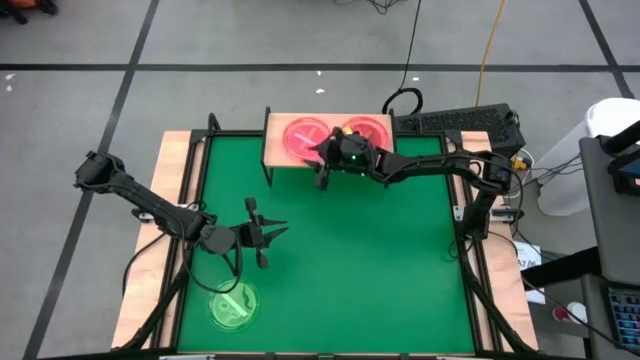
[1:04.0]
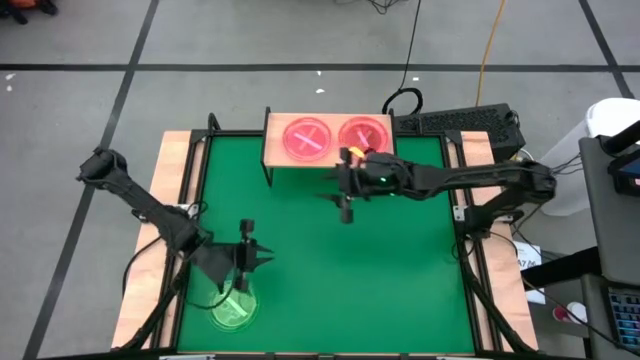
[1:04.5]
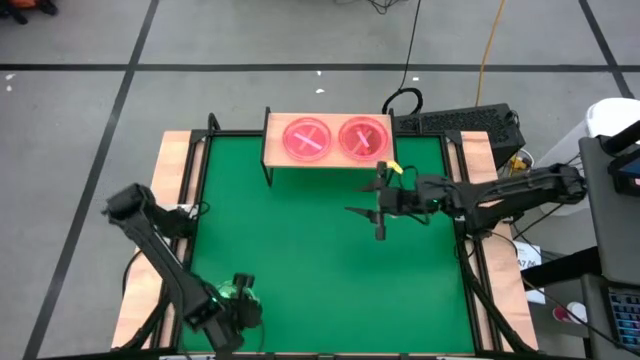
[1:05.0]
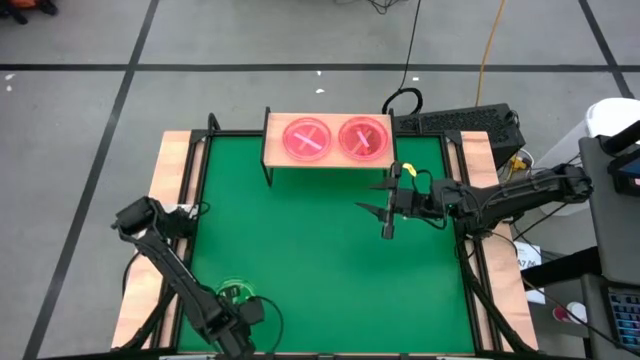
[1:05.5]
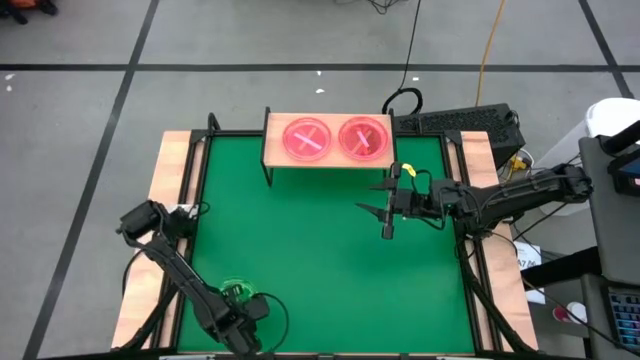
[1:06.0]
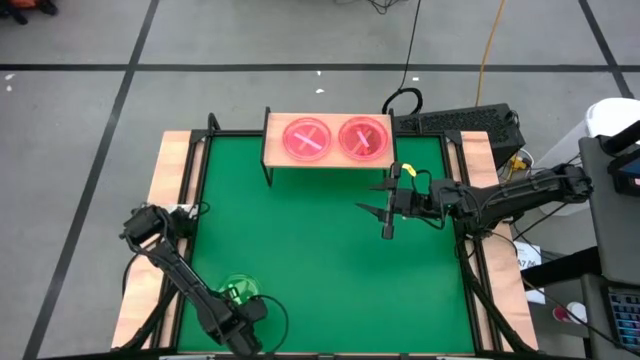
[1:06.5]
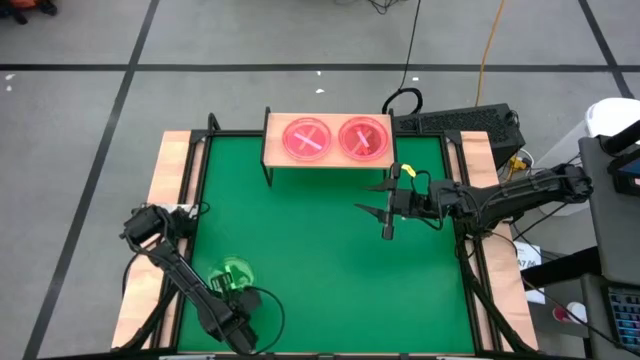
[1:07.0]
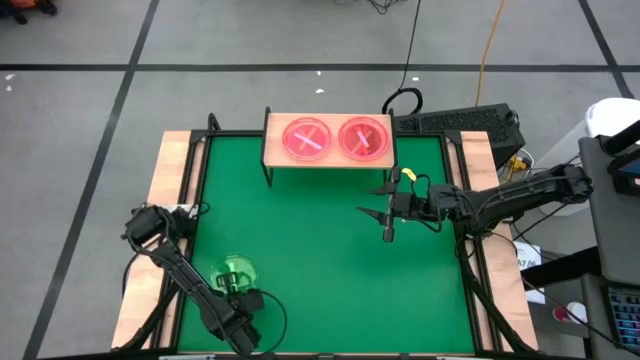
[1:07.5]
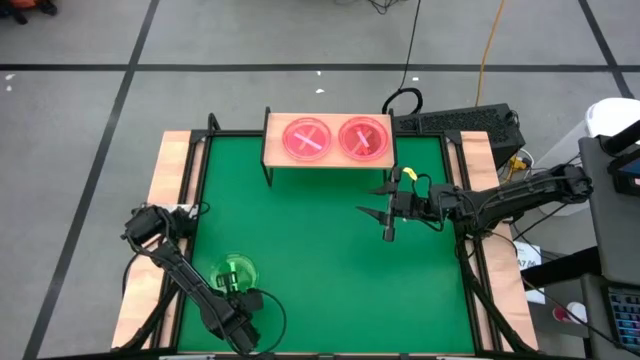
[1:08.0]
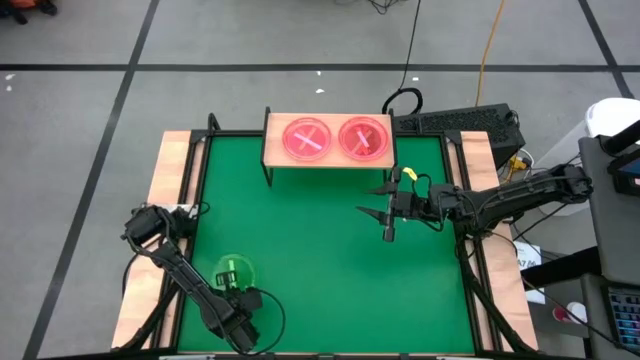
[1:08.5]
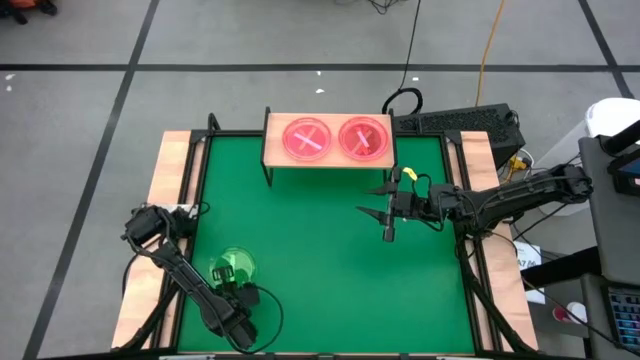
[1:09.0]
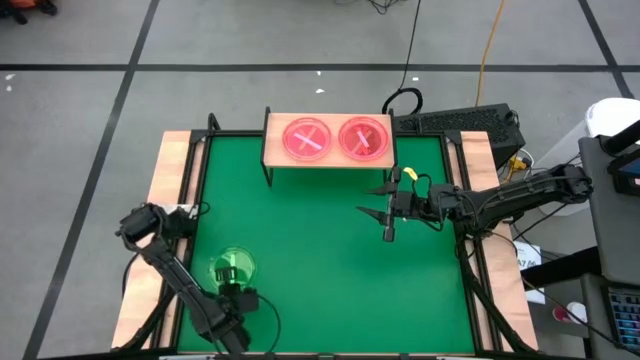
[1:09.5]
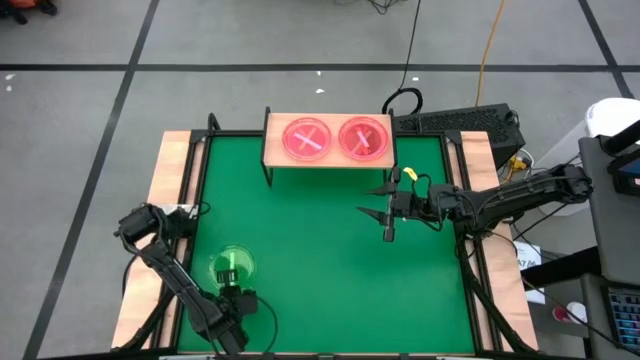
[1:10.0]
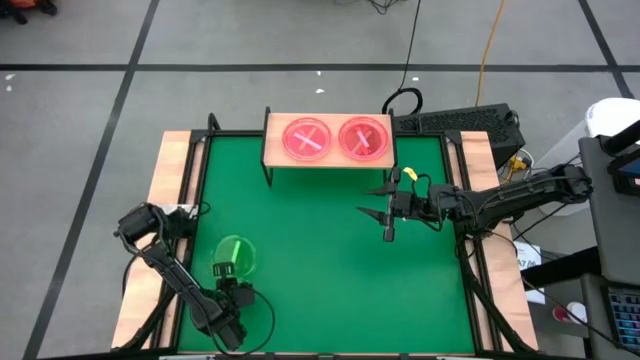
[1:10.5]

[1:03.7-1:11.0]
Task: Place and stack plates onto a shelf
Stack the green plate on top of the pink plate on the shelf

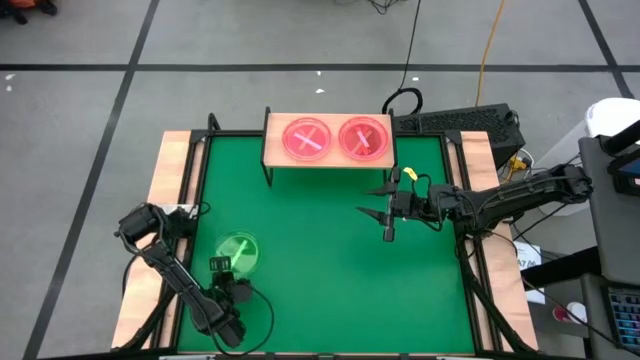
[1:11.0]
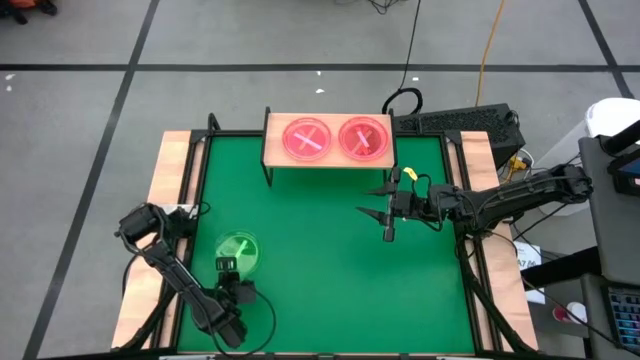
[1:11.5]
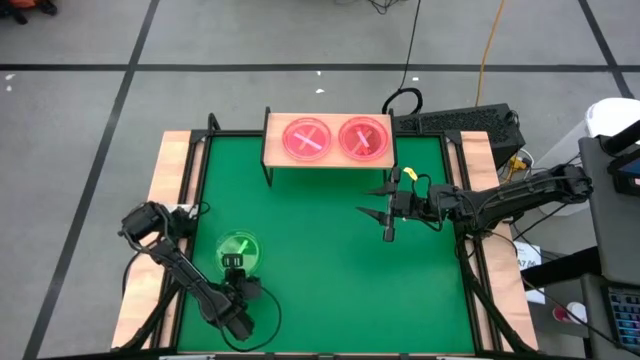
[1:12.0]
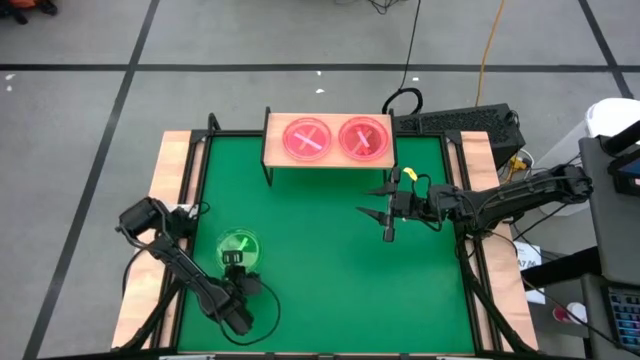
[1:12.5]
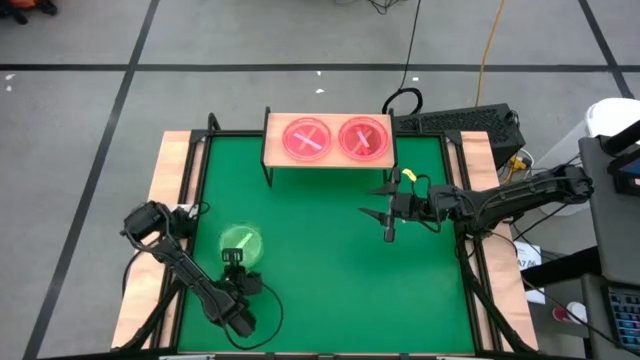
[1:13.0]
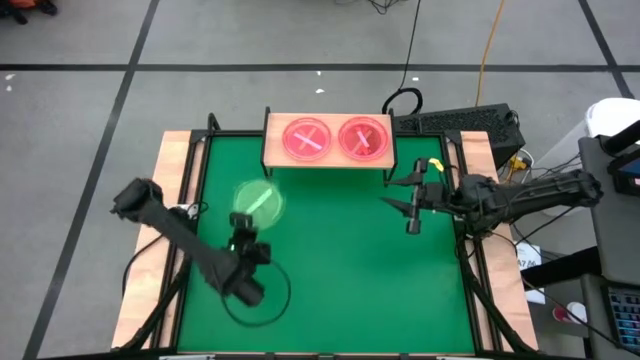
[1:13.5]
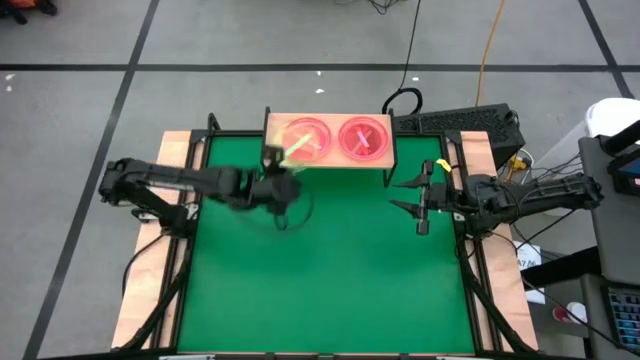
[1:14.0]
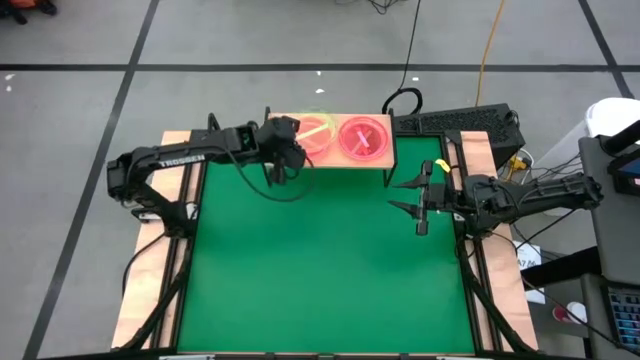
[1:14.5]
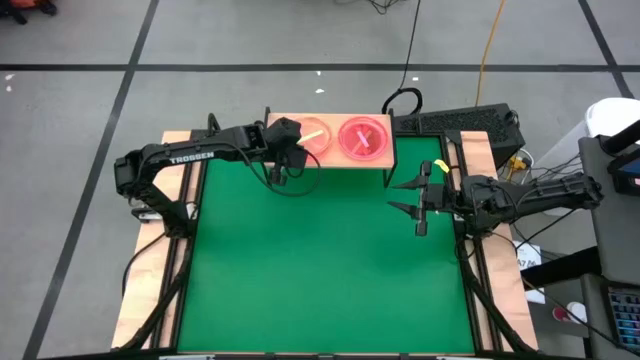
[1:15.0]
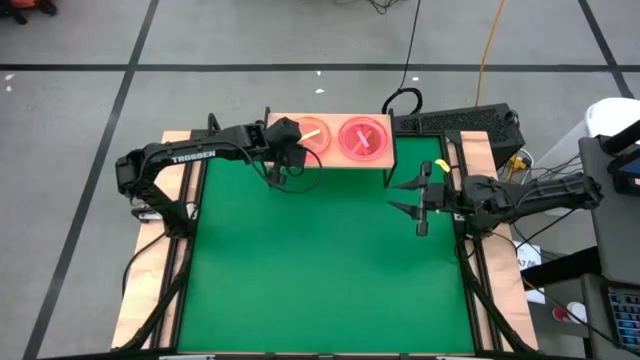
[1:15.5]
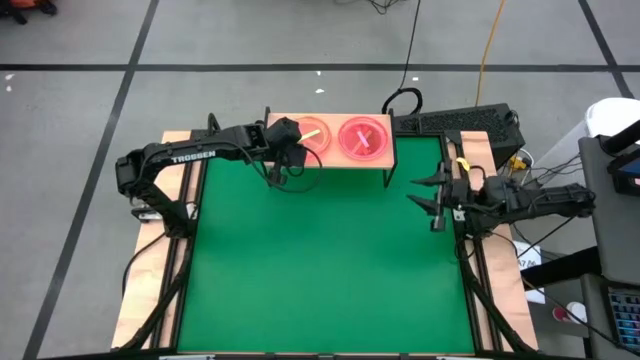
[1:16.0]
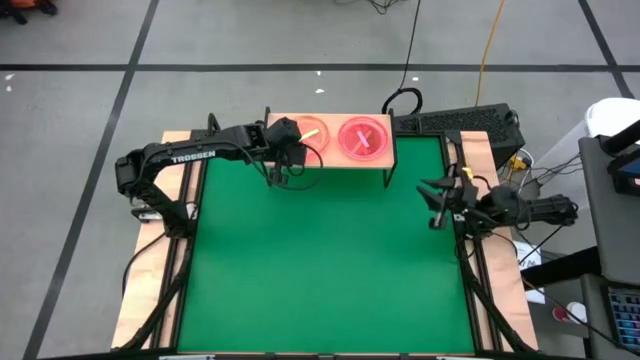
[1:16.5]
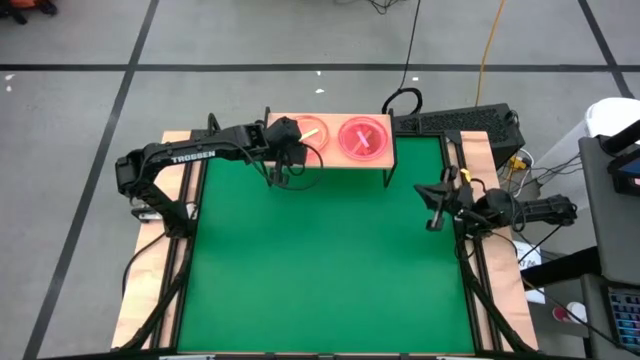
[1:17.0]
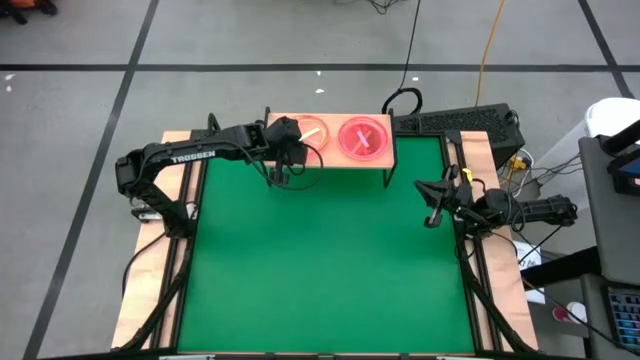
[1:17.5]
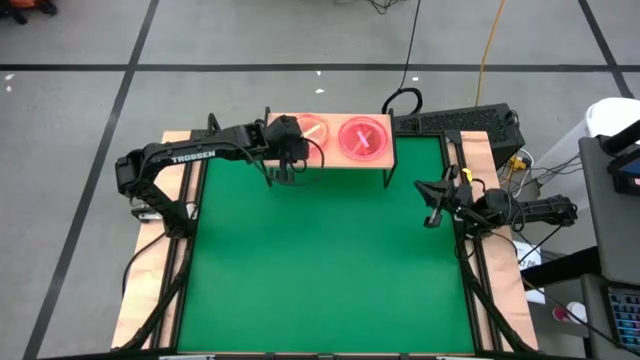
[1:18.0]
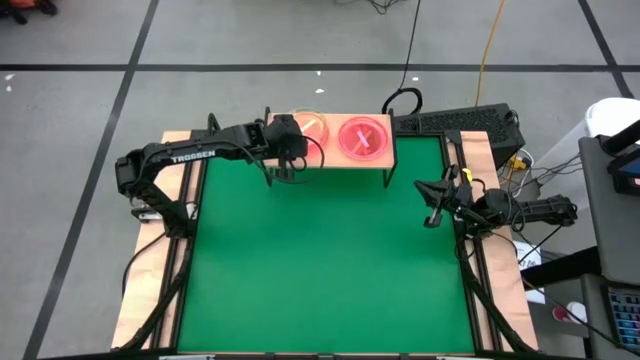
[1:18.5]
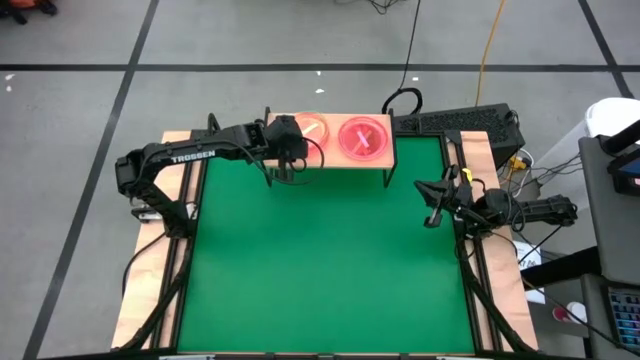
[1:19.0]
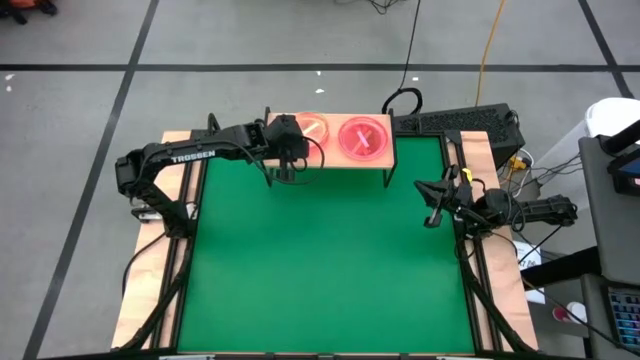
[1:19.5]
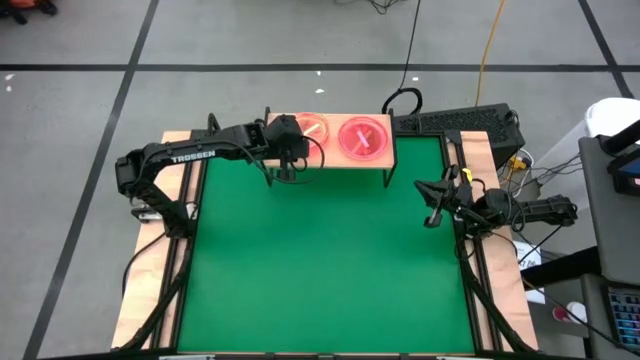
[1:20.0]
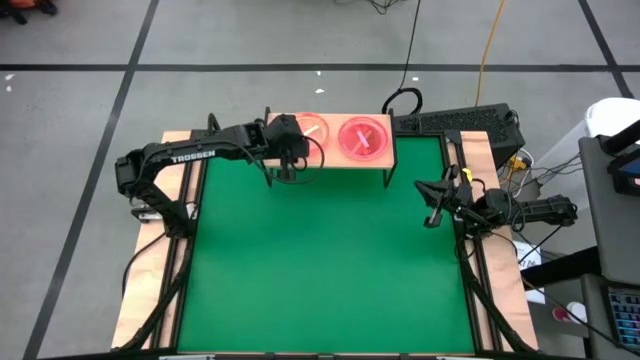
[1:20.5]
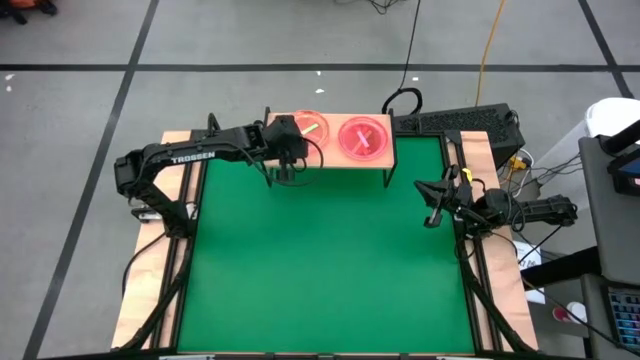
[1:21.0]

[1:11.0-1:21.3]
Stack the green plate on top of the pink plate on the shelf

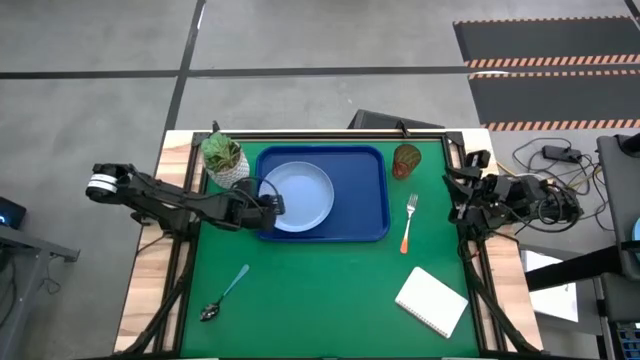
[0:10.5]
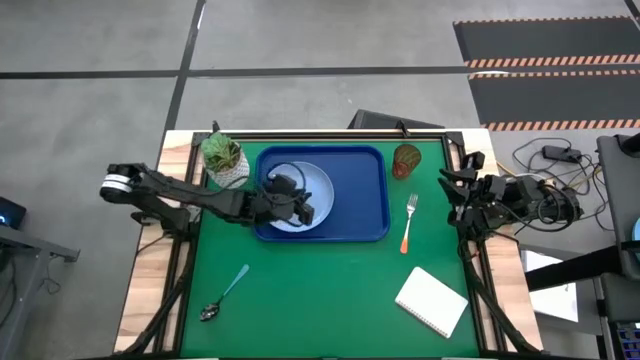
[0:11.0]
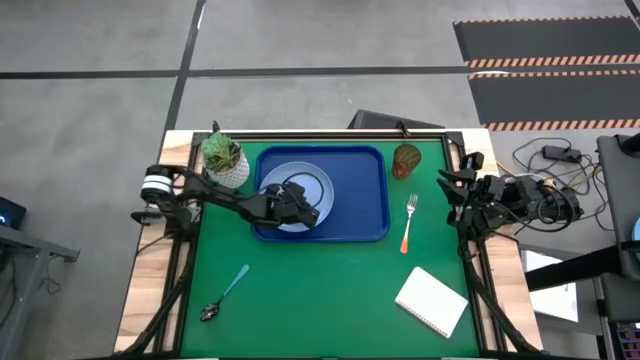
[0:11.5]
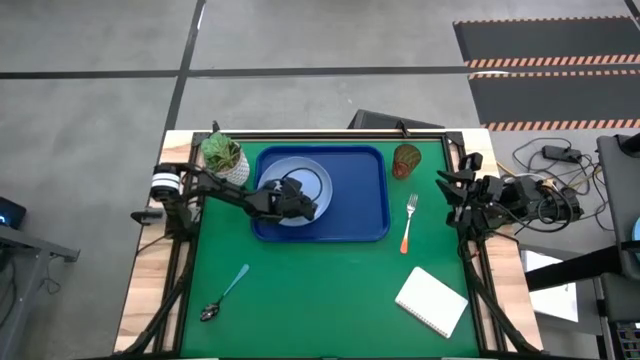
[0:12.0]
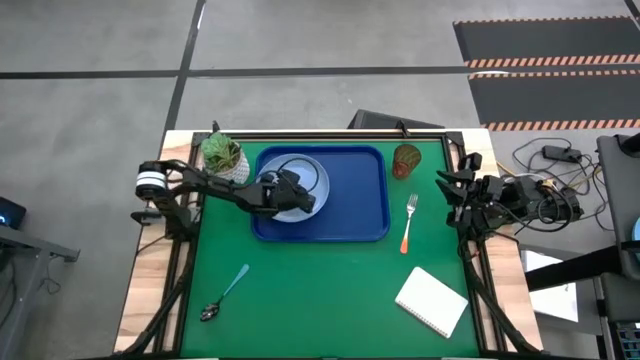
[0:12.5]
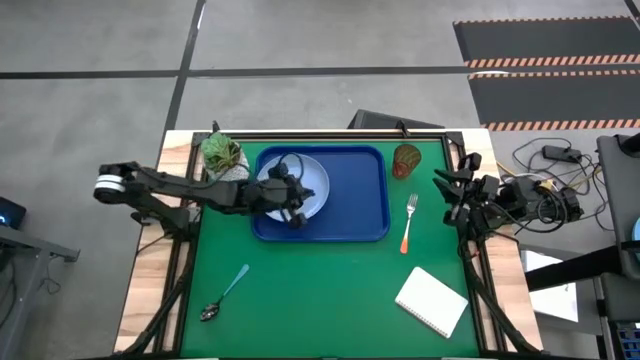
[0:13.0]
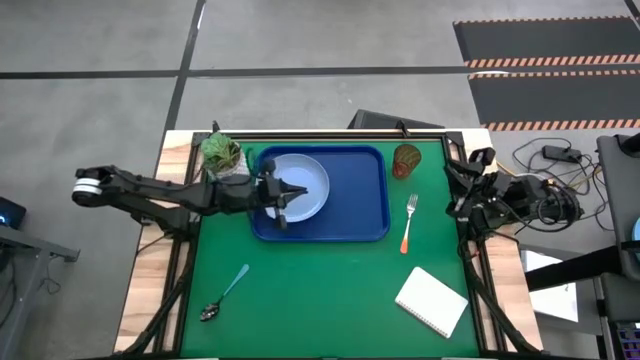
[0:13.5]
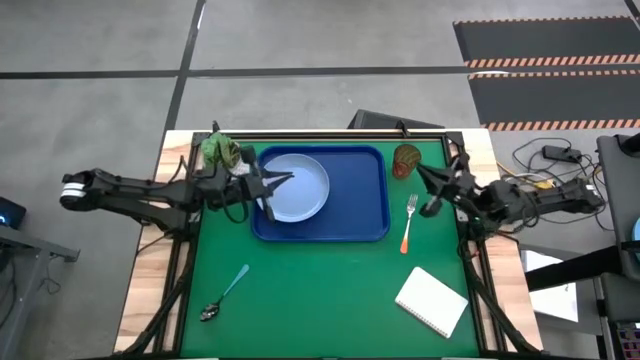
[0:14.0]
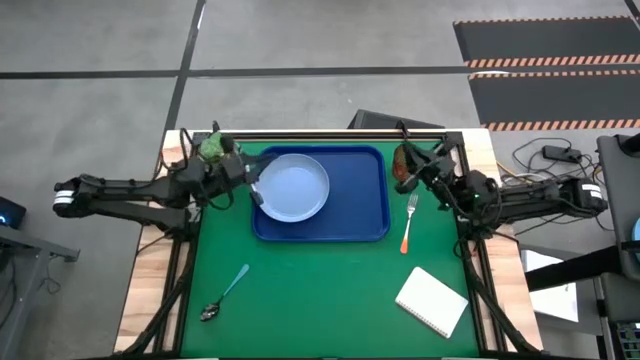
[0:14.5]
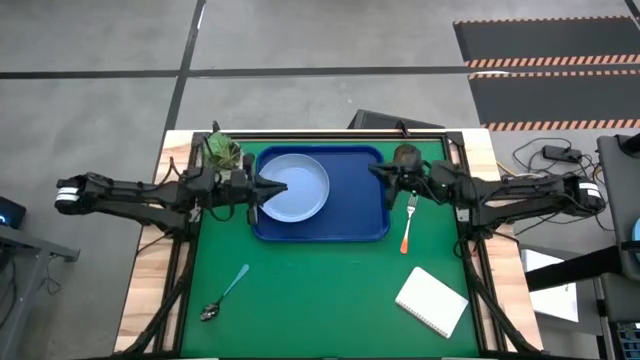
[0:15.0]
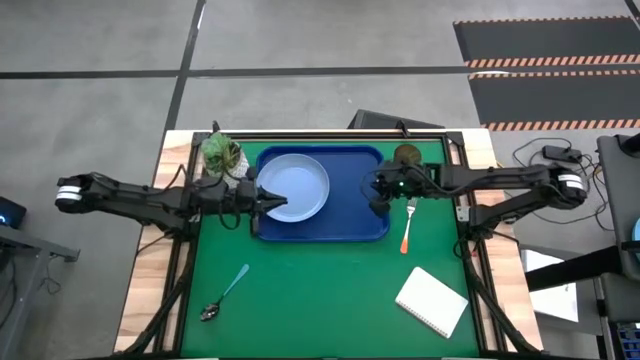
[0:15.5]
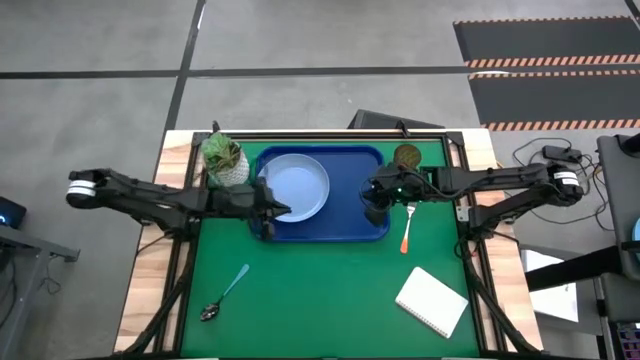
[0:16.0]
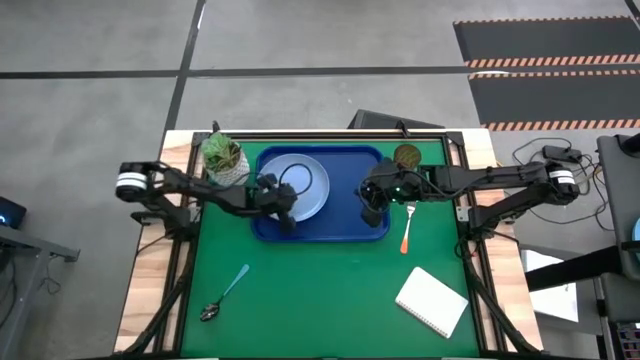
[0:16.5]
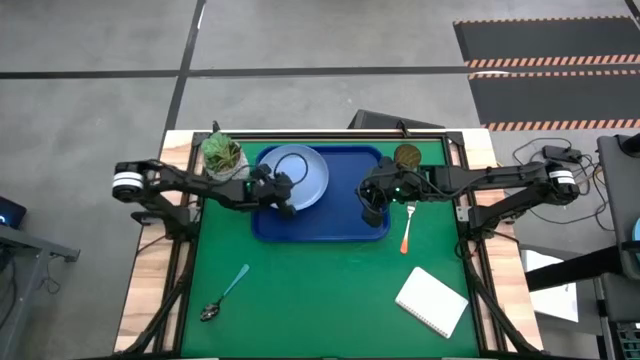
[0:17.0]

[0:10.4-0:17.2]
Task: Pick and place plate/cup/fork/spoon on tray
Adjust the light blue plate
